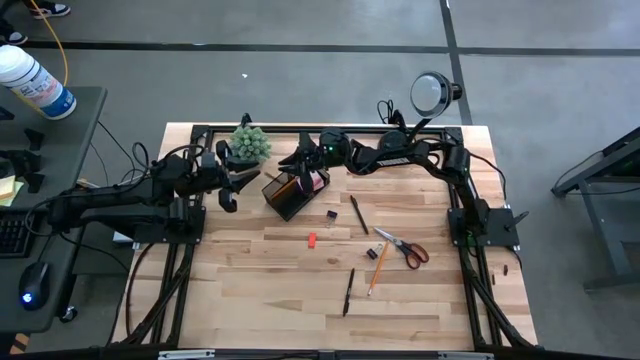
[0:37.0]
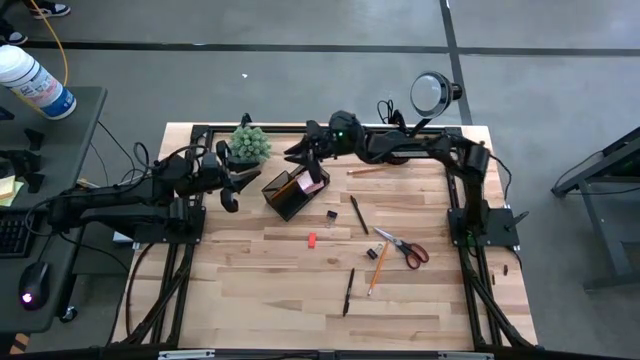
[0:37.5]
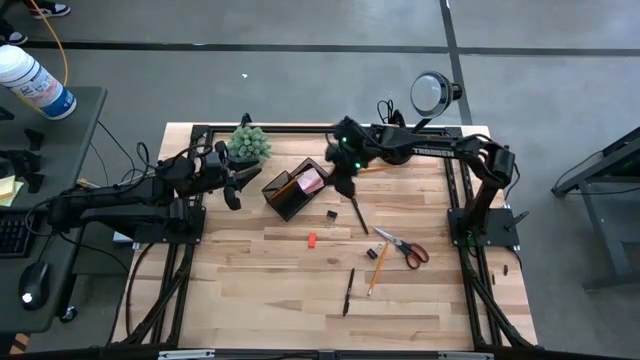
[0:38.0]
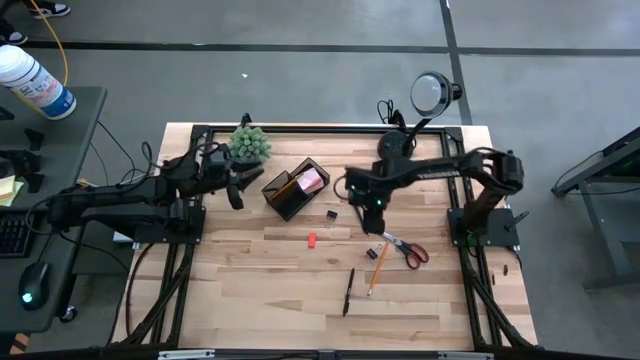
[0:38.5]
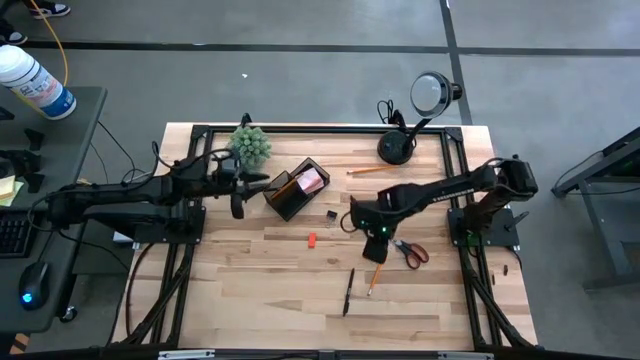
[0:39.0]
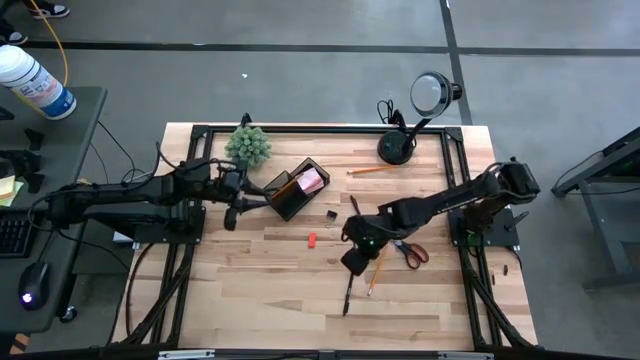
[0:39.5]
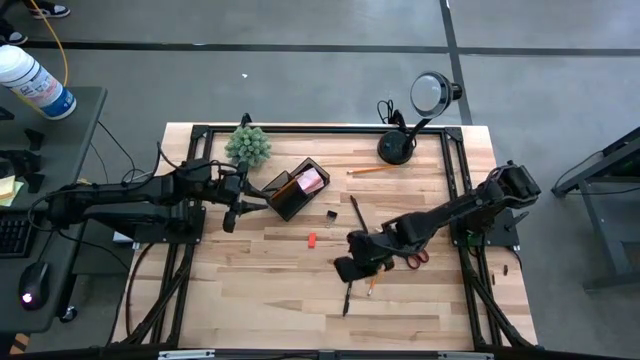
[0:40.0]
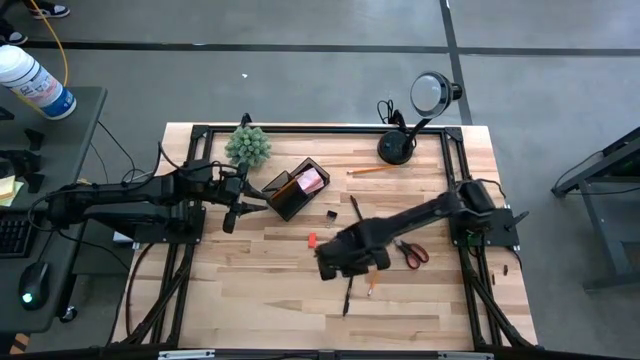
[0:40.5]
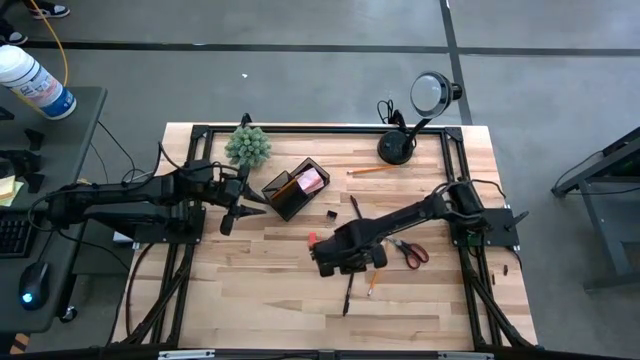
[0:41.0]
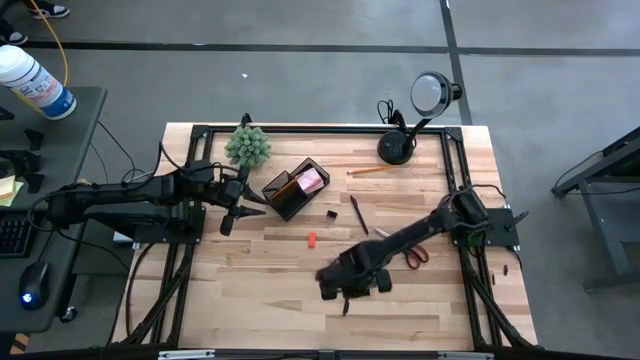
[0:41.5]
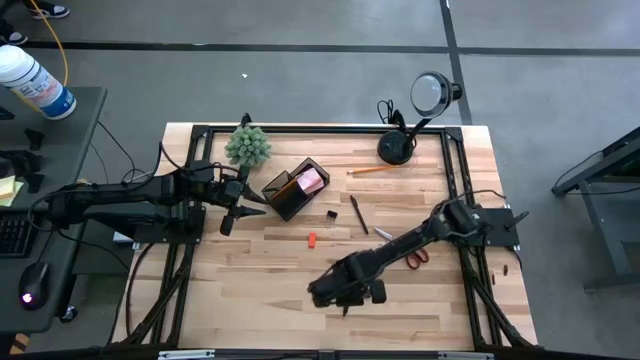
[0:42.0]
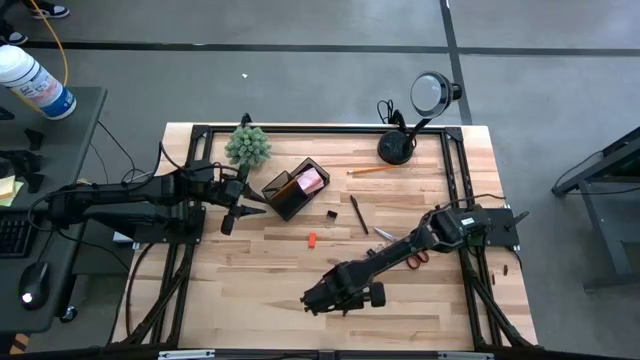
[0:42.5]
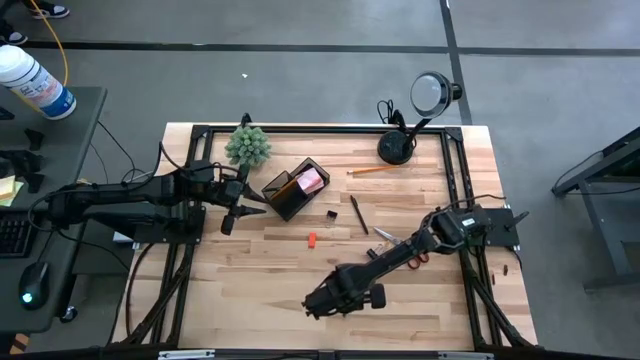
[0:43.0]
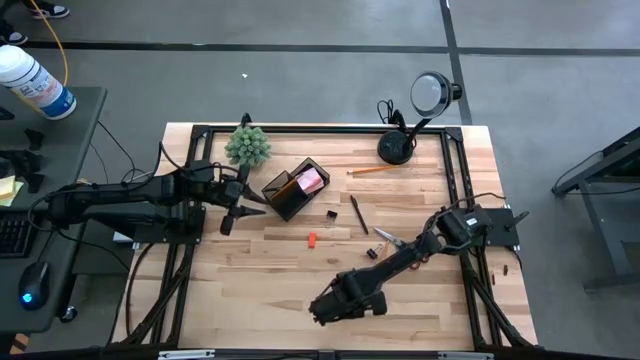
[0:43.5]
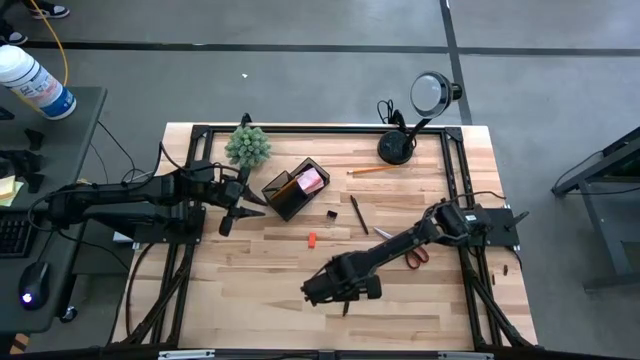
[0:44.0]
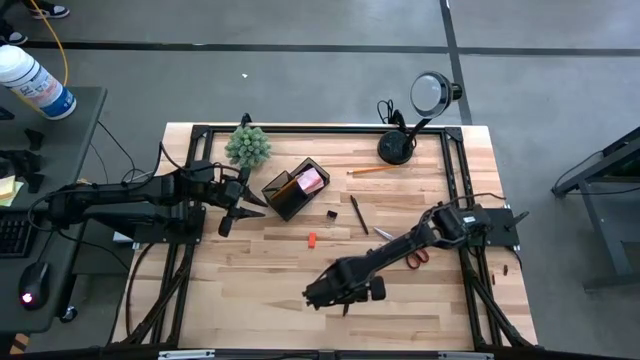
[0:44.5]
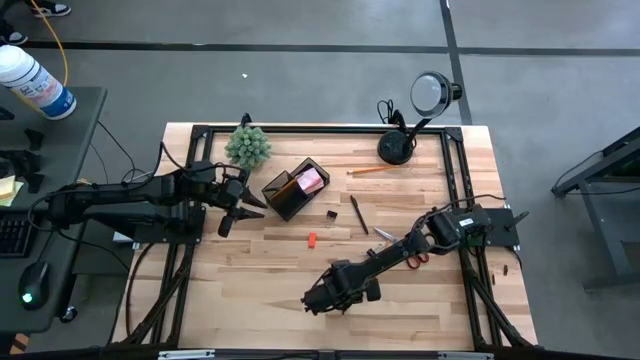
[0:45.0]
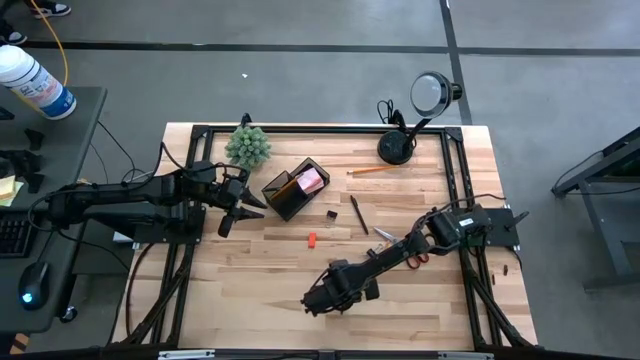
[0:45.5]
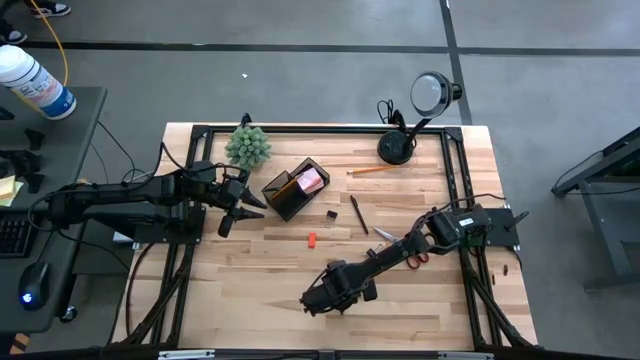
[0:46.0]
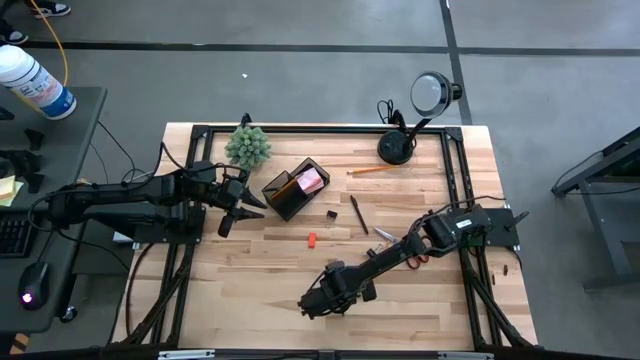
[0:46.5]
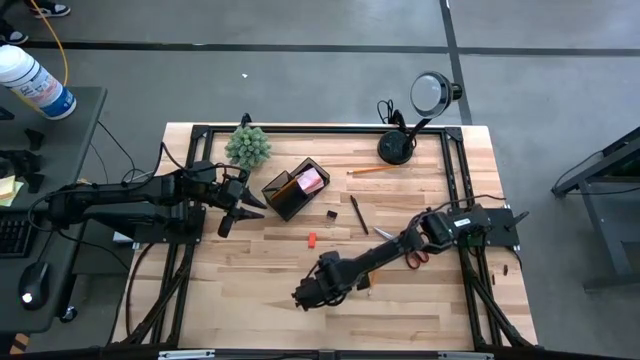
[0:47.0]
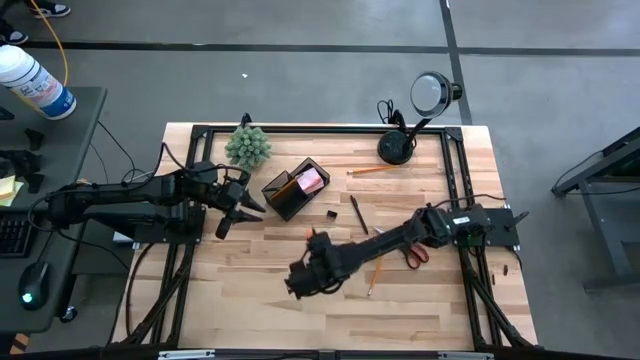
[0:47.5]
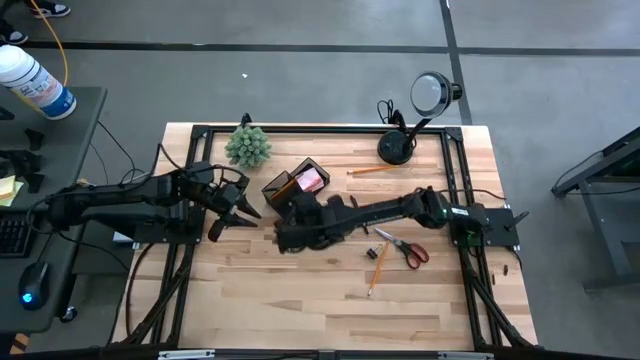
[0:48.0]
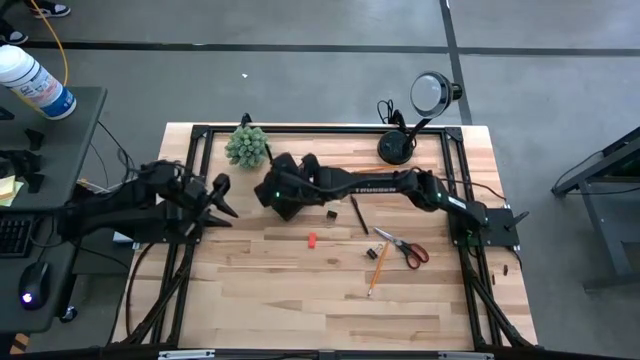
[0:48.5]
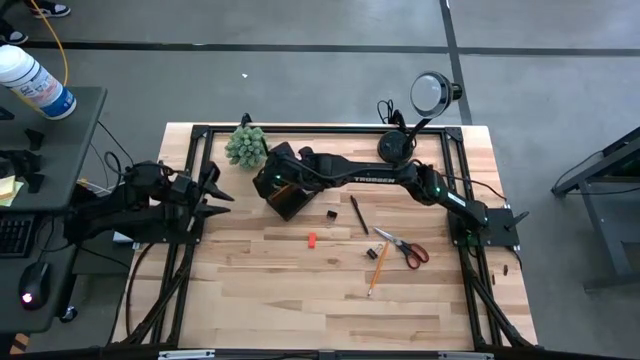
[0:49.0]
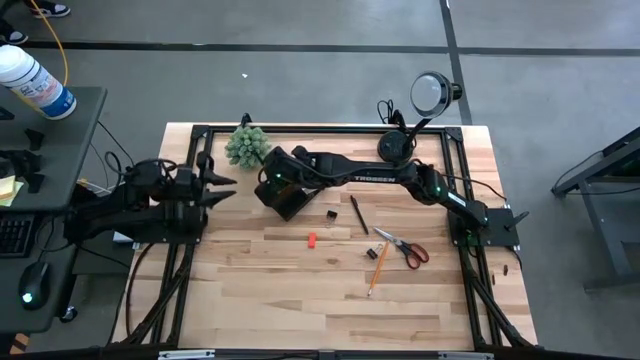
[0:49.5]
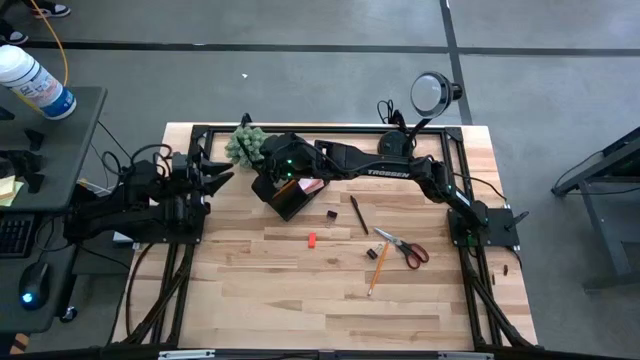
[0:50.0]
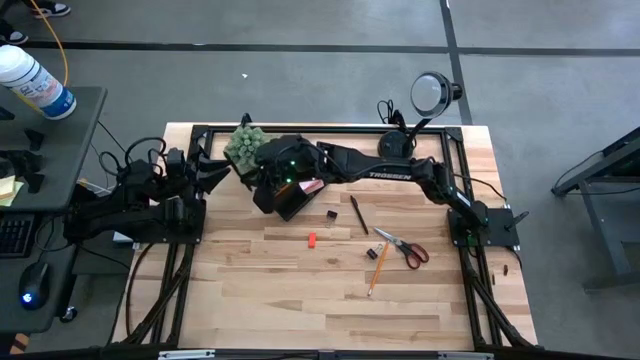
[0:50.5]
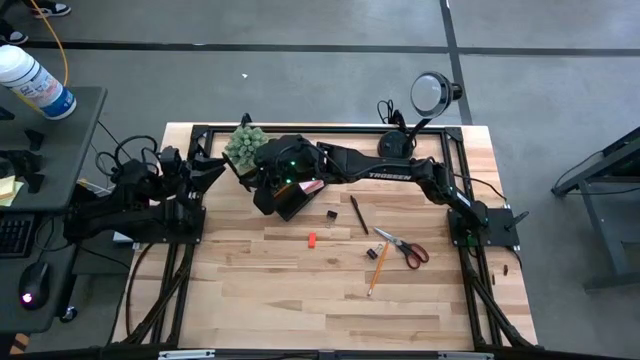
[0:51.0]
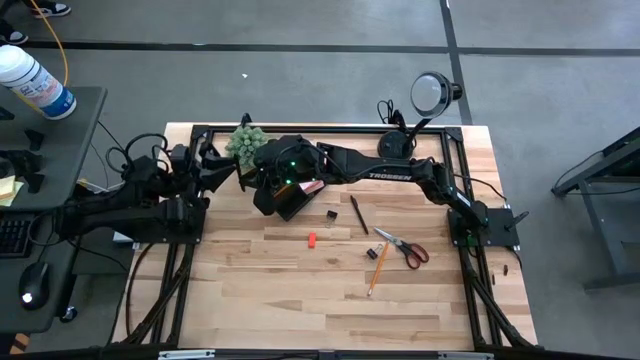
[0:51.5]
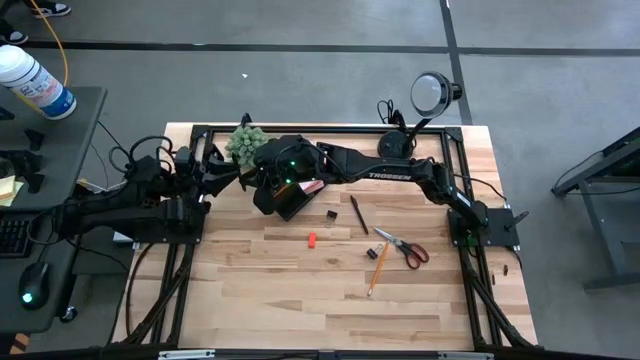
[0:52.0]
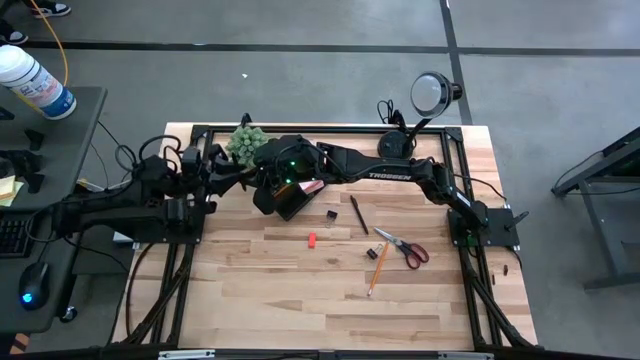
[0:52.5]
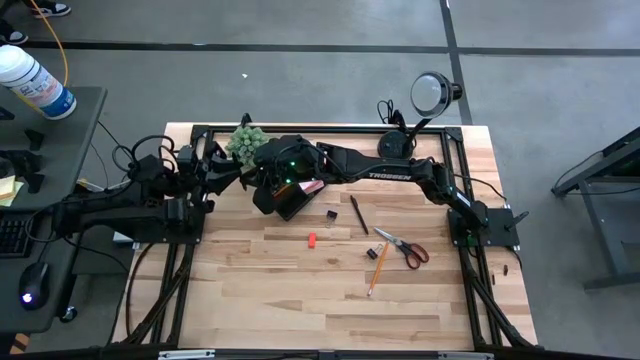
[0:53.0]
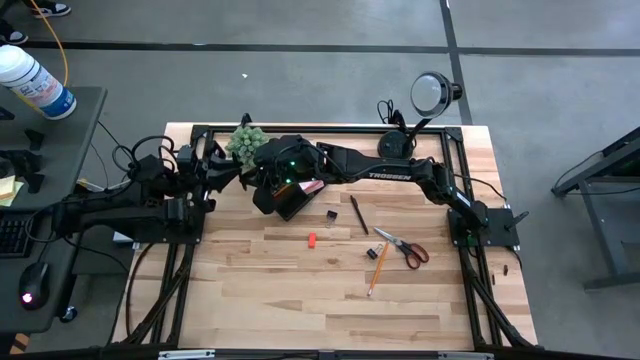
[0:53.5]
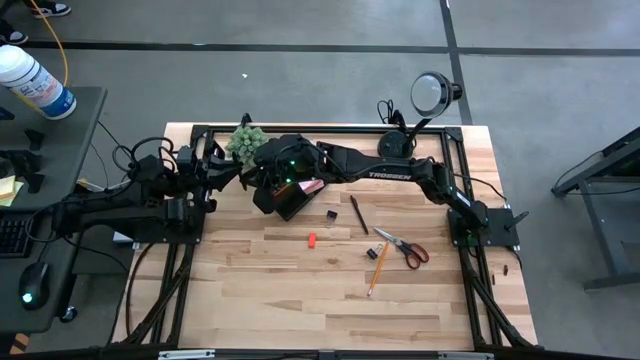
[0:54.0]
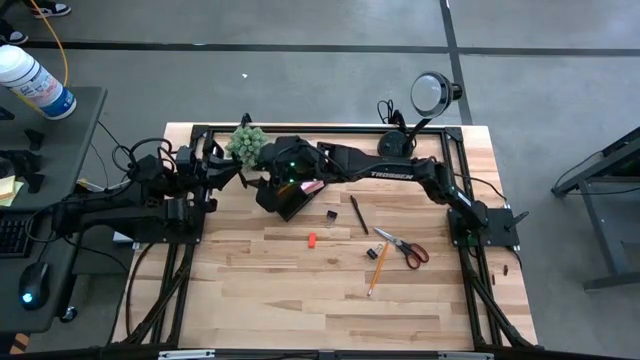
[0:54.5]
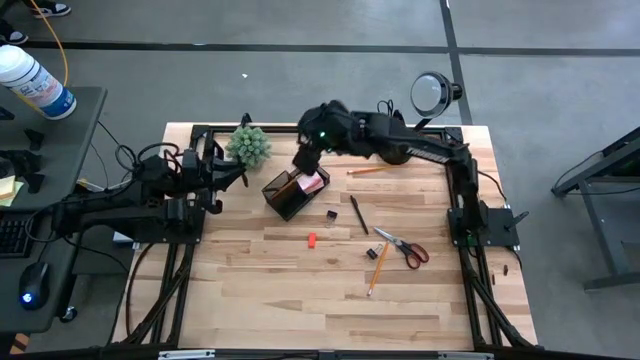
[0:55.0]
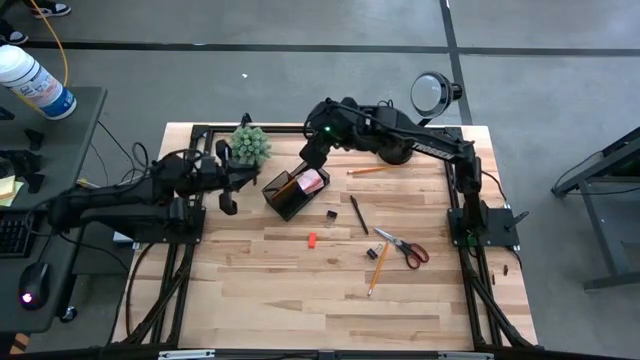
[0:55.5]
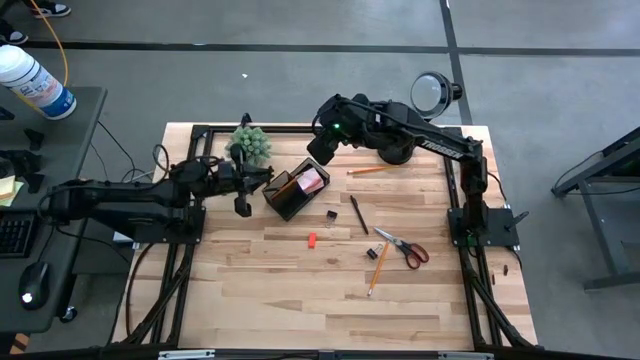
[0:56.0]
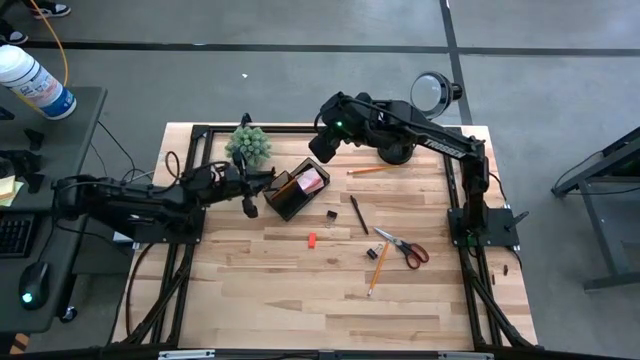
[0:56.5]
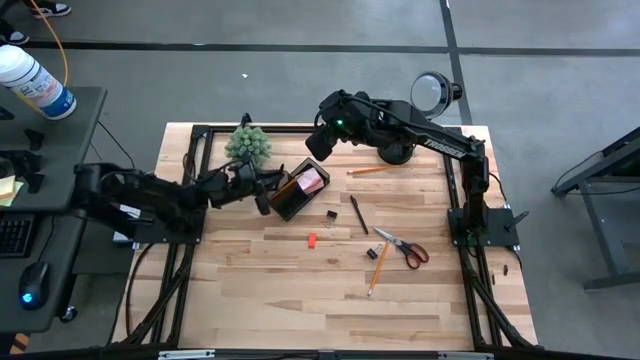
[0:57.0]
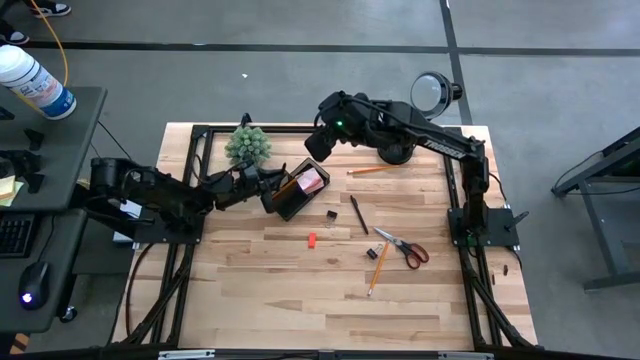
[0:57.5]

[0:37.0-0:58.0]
Task: Pick and place office supplies into organizer
Put the bottom black pen into the black desk organizer
